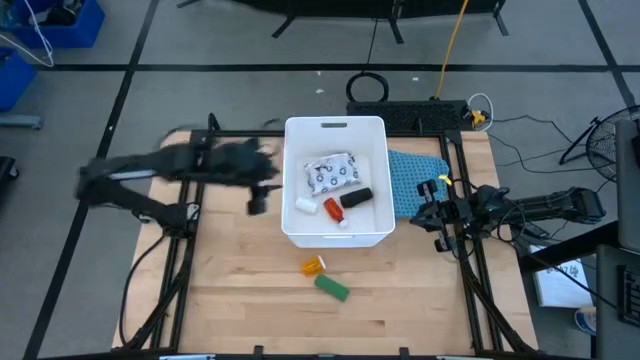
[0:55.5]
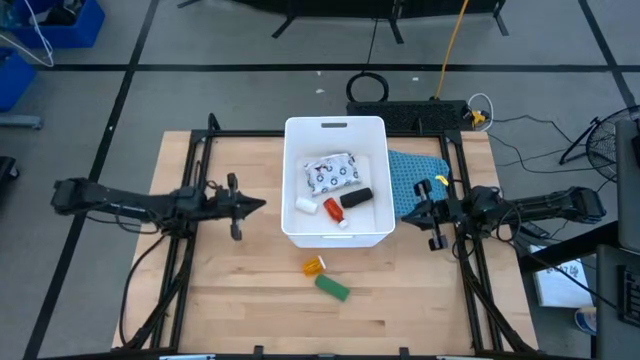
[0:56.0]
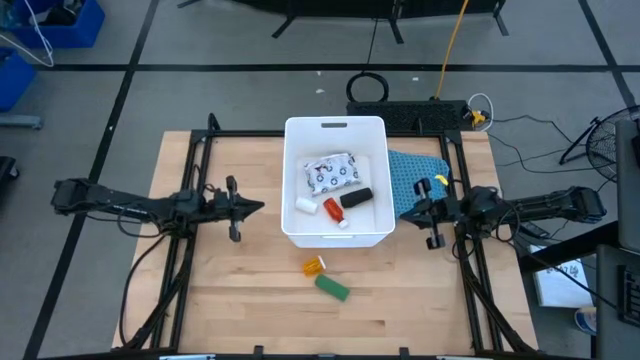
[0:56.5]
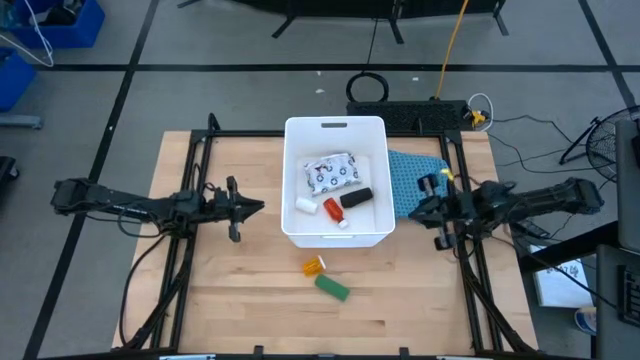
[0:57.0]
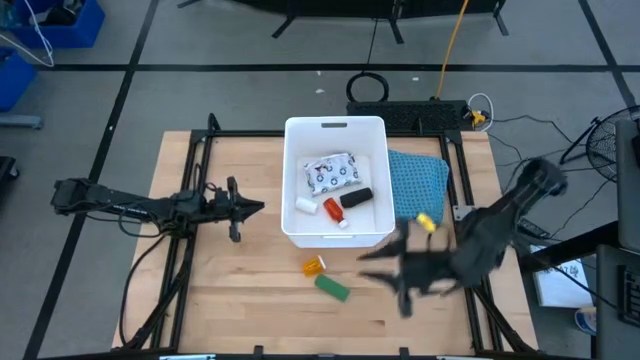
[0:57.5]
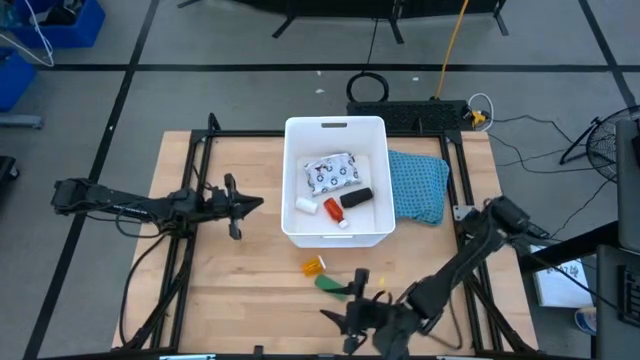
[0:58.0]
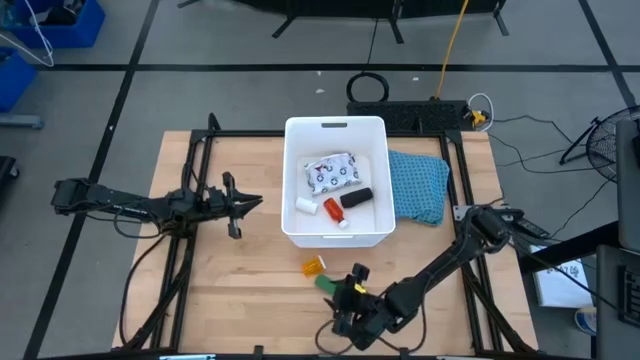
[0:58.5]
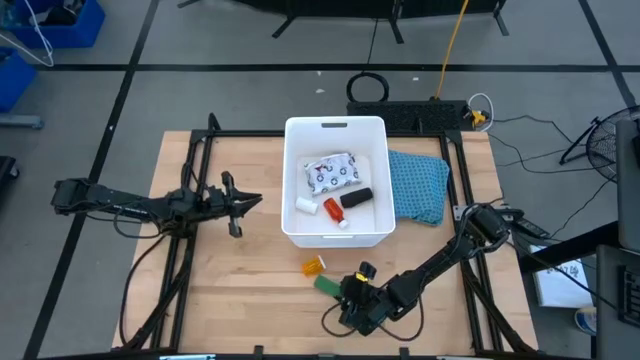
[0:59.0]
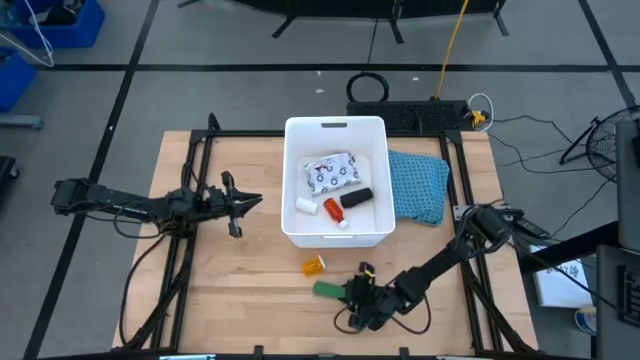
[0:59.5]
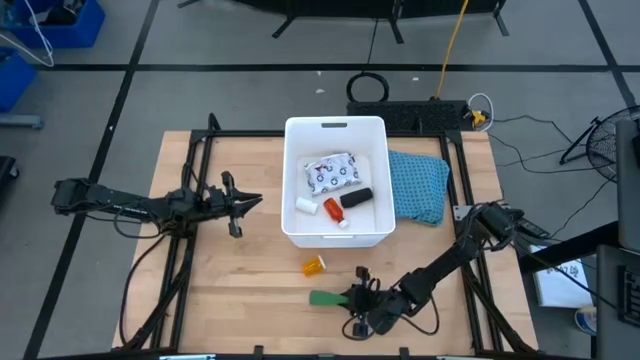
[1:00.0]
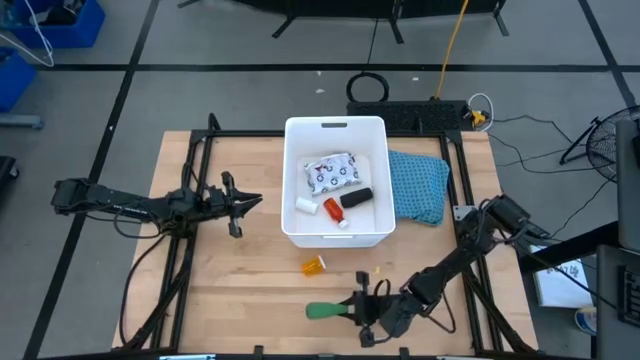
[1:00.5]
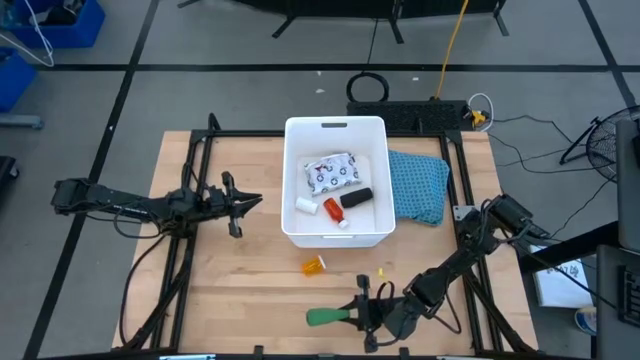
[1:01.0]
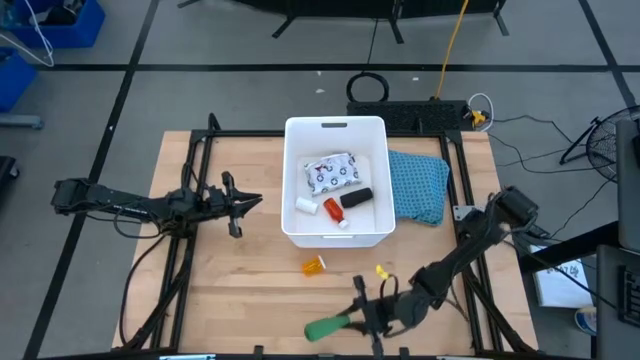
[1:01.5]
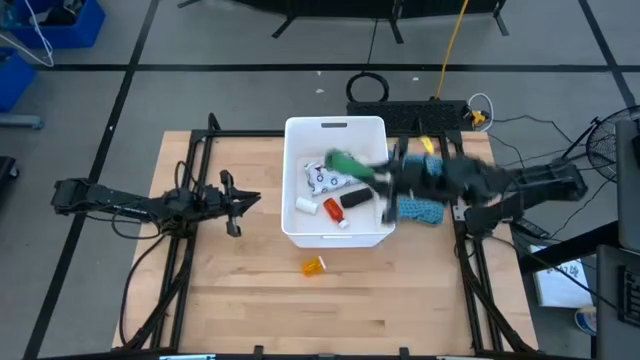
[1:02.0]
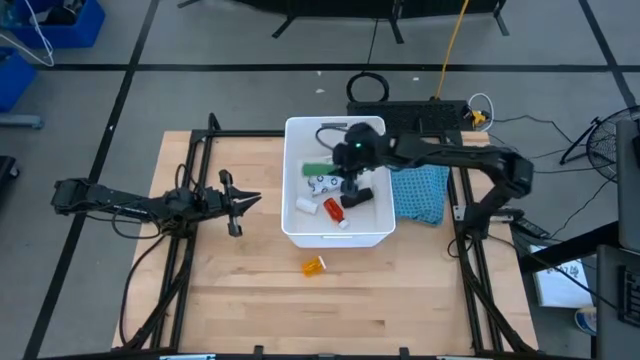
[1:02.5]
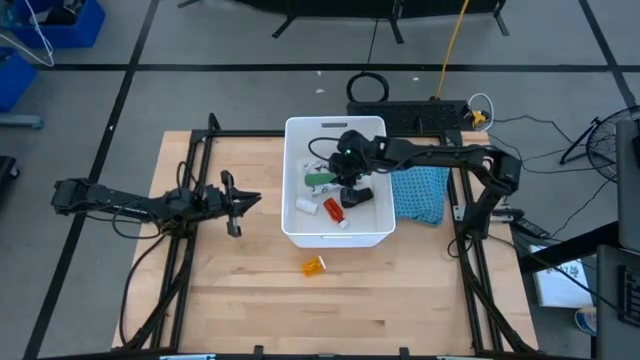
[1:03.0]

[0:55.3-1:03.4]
Task: Pick & place medical supplies in basket/bin
Put the green bandage into the white bin

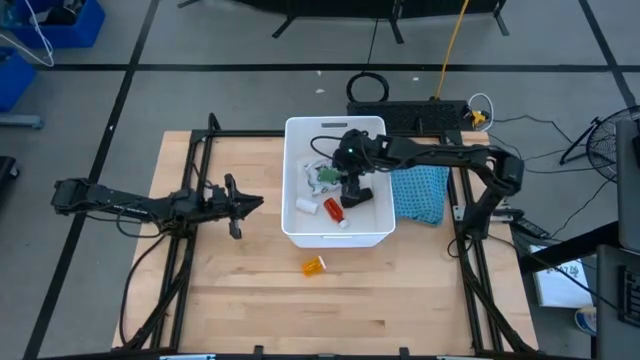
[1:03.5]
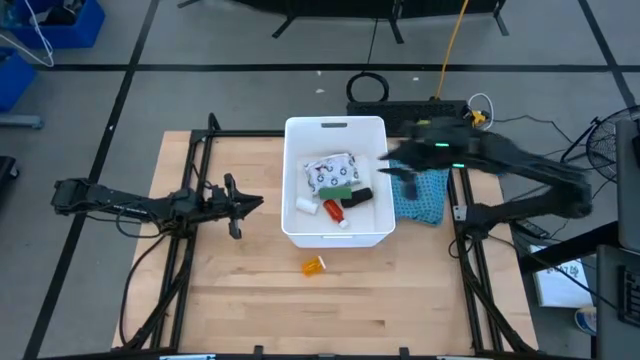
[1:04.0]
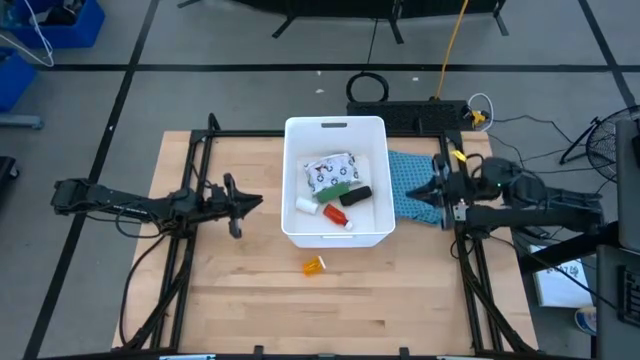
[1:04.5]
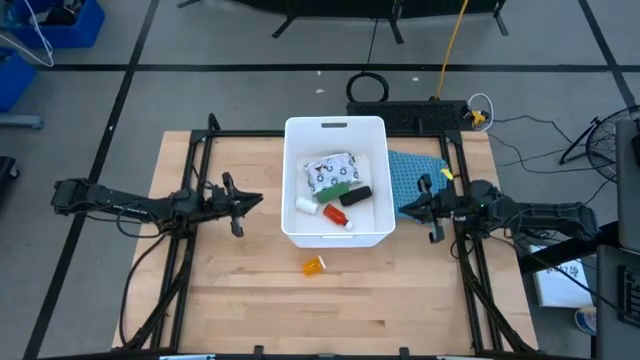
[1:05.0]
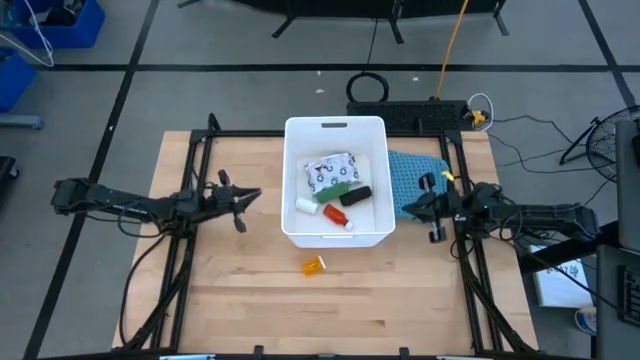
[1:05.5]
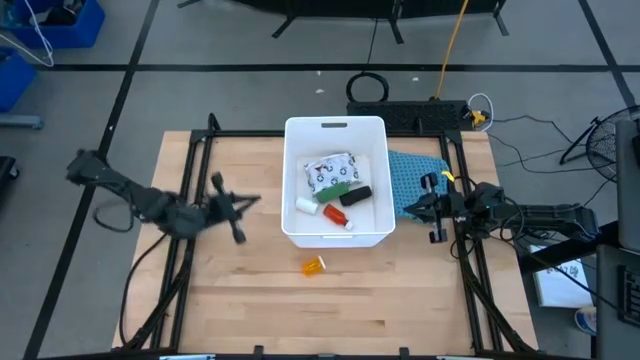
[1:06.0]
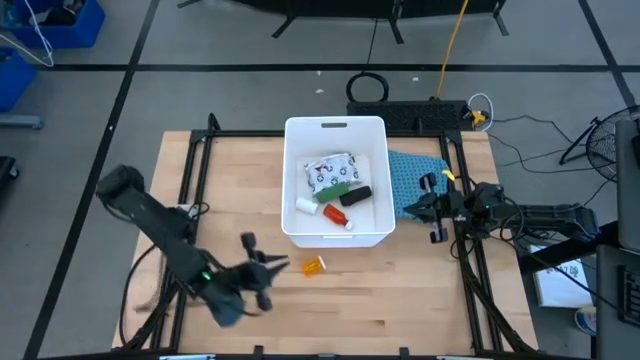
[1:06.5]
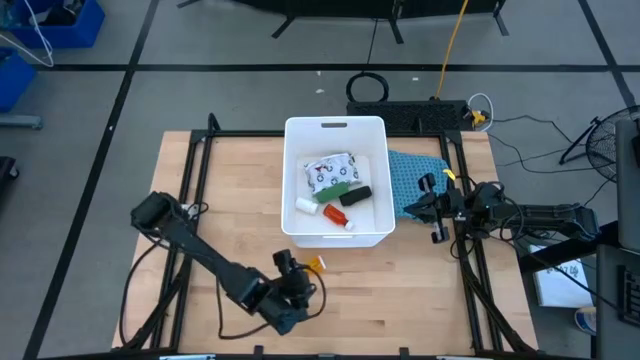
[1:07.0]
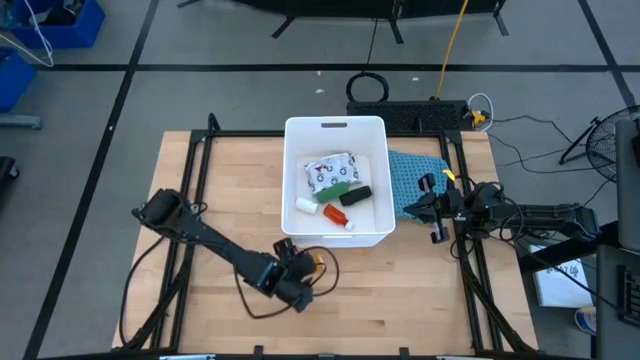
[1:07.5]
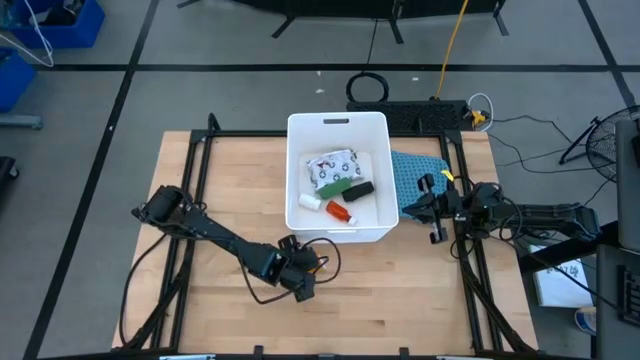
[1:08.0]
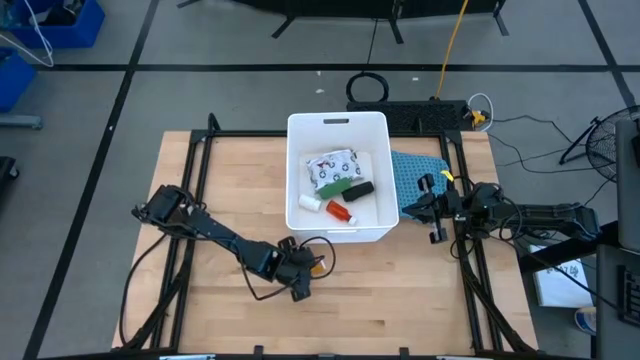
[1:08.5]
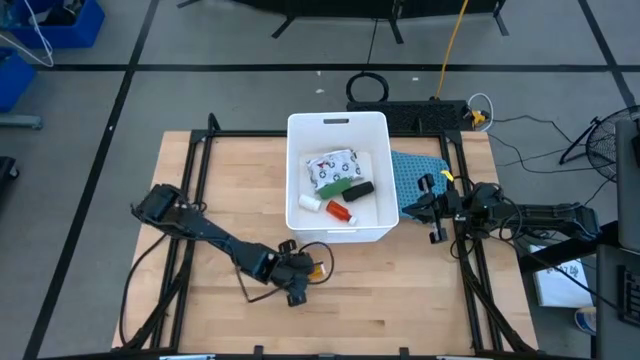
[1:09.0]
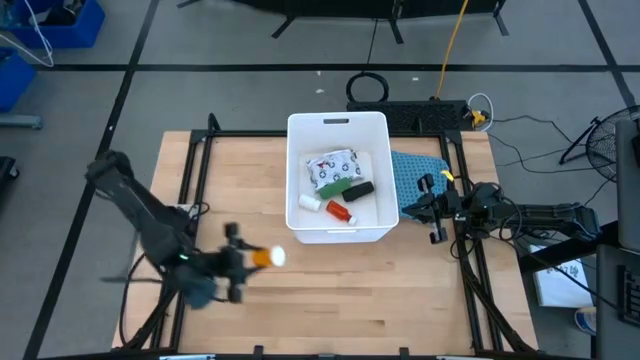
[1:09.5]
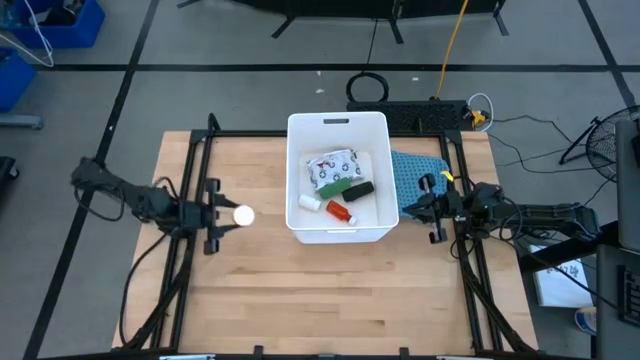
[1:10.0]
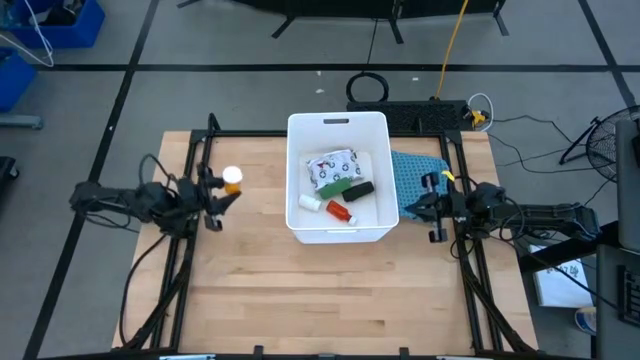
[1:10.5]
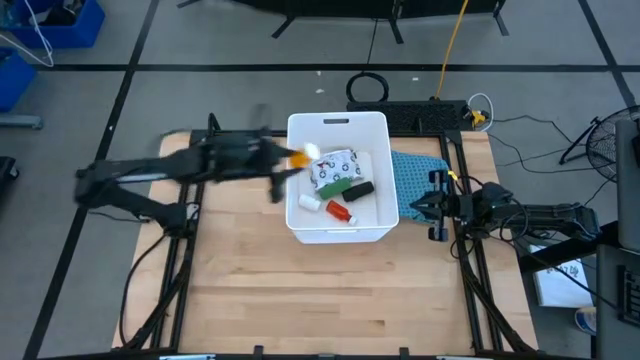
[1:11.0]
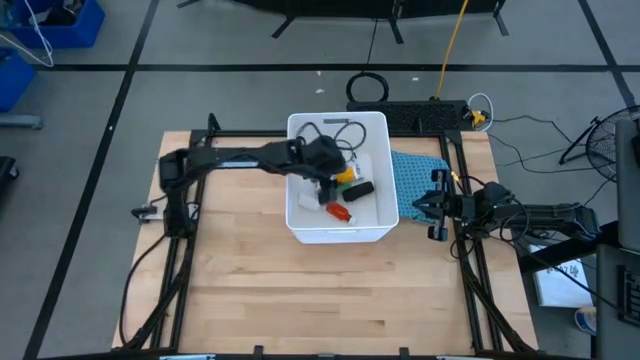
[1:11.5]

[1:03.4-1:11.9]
Put the orange pill bottle into the white bin

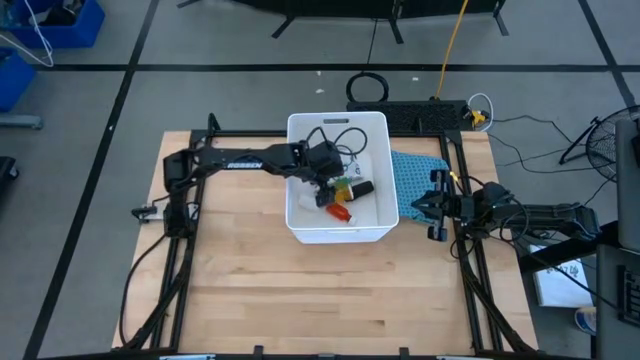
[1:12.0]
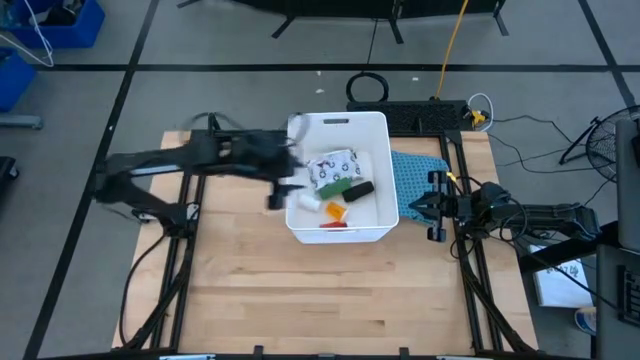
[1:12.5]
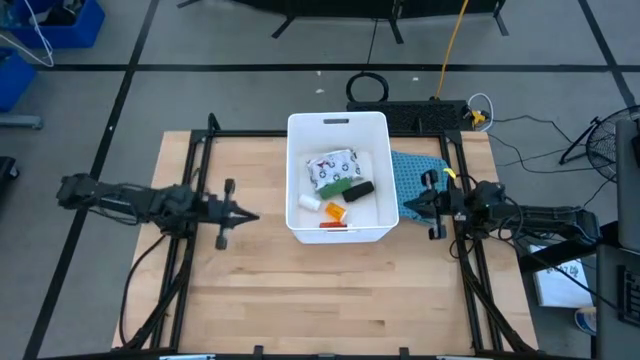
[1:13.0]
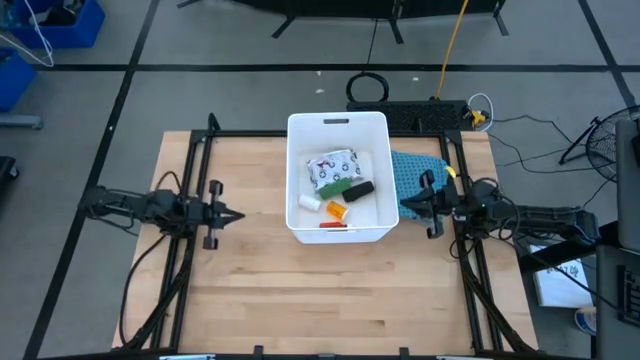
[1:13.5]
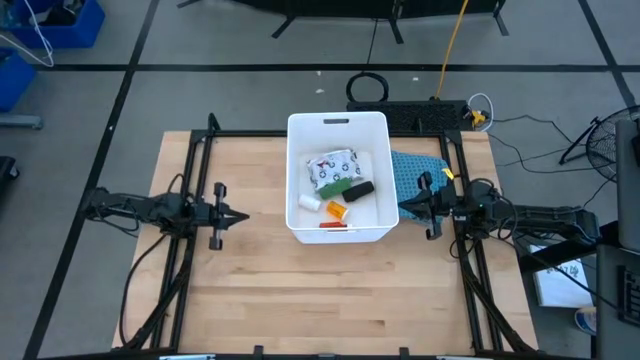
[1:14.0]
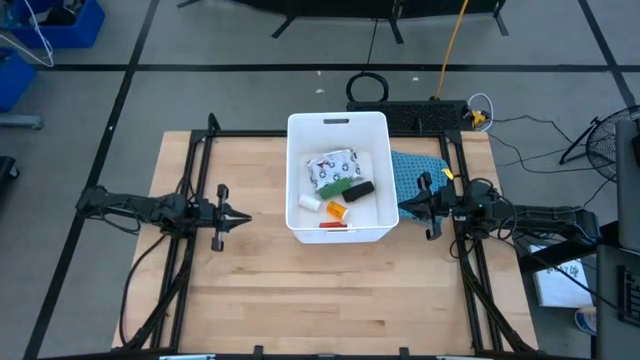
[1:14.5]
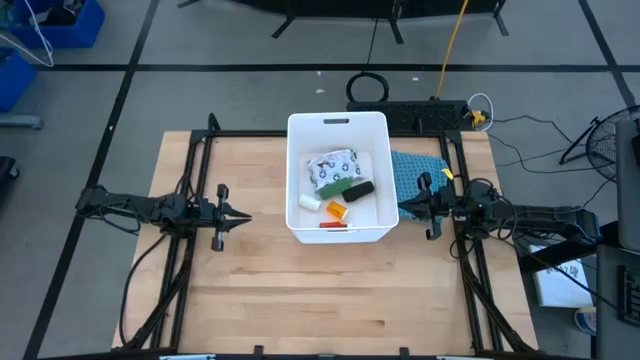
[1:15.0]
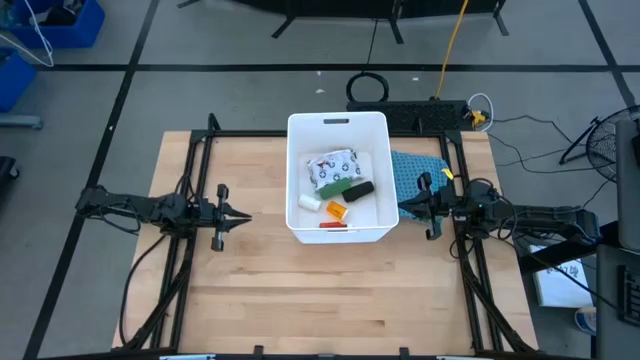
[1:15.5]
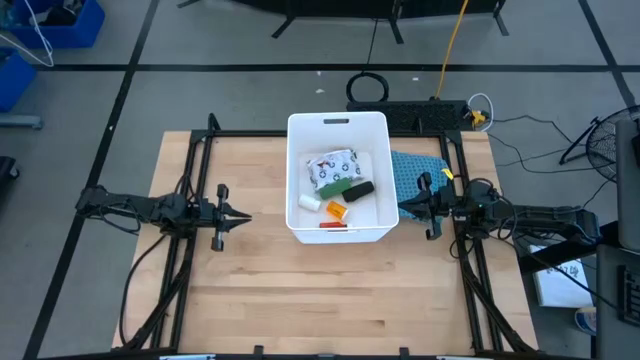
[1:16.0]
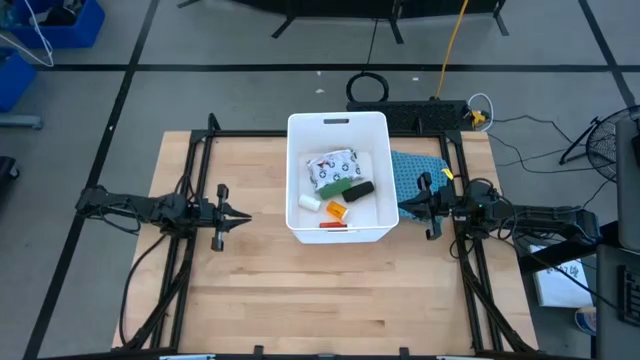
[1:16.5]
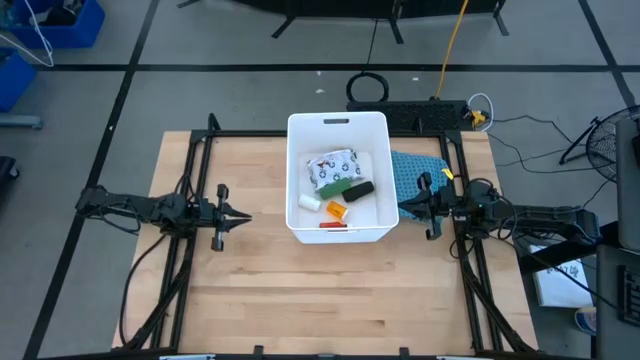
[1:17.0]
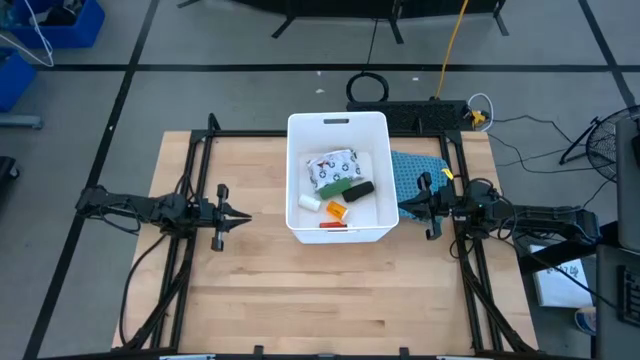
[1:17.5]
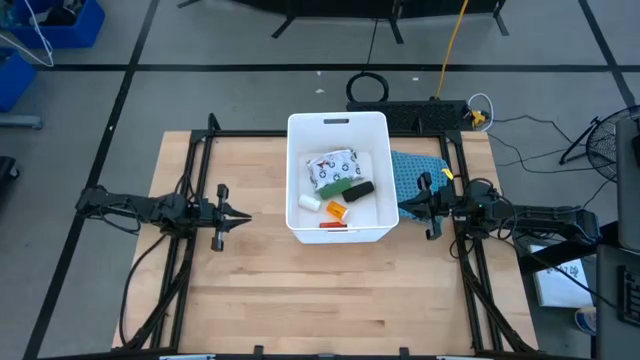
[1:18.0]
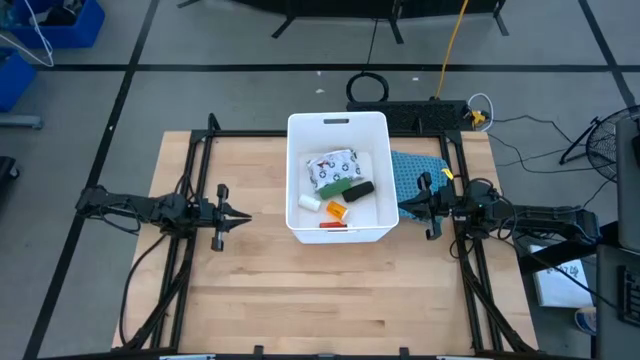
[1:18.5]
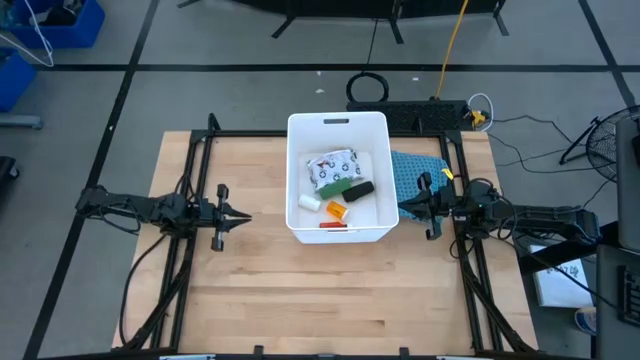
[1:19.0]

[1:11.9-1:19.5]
Return to Home Position
